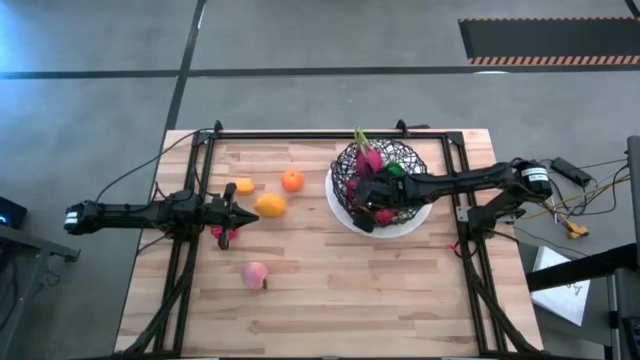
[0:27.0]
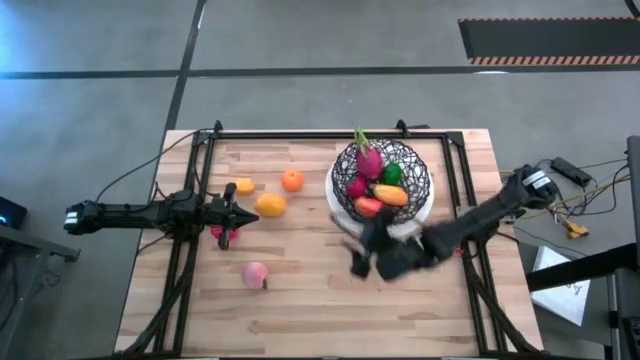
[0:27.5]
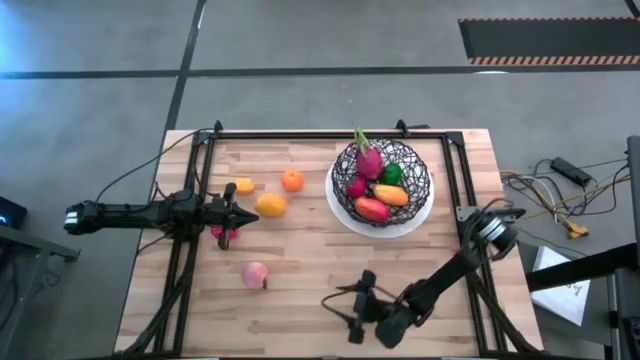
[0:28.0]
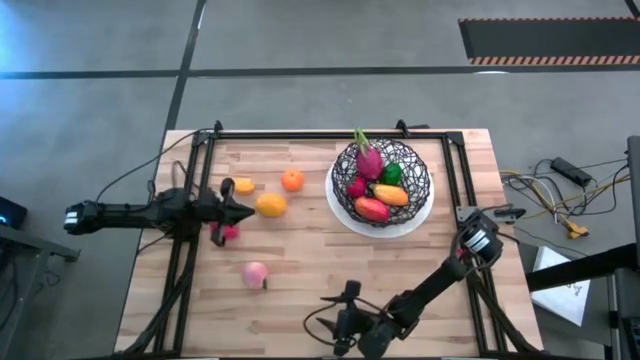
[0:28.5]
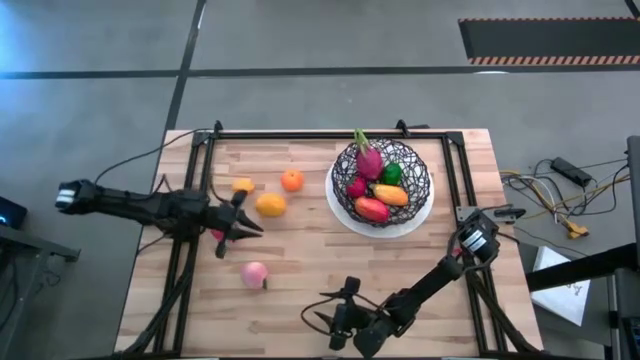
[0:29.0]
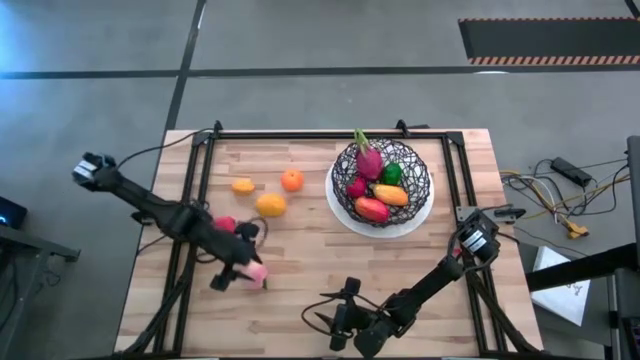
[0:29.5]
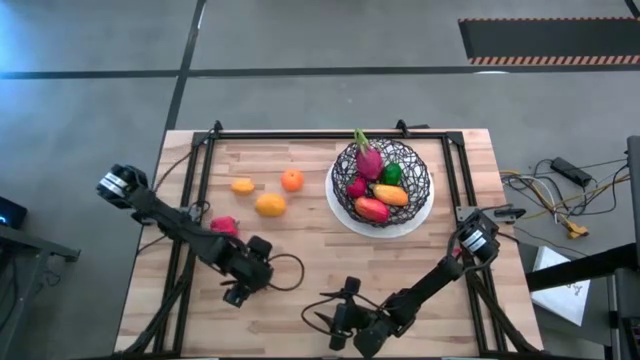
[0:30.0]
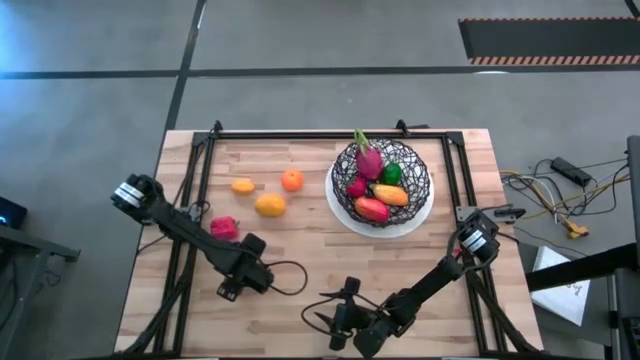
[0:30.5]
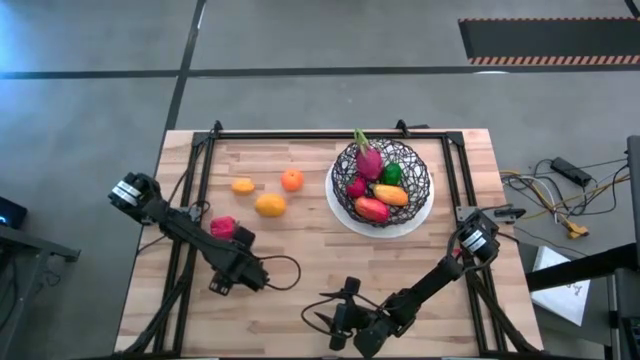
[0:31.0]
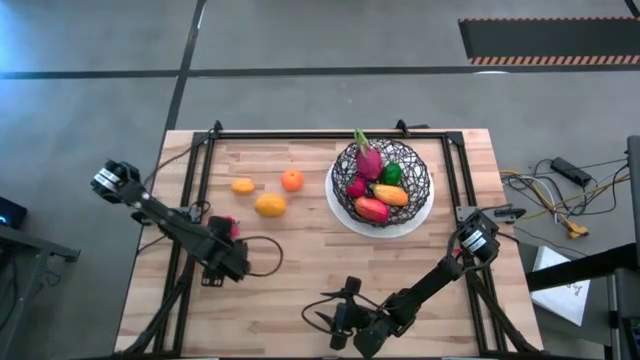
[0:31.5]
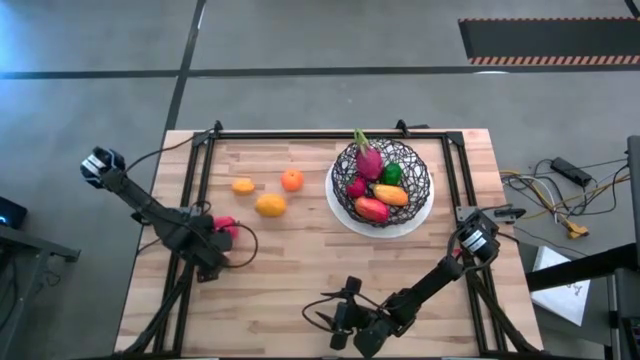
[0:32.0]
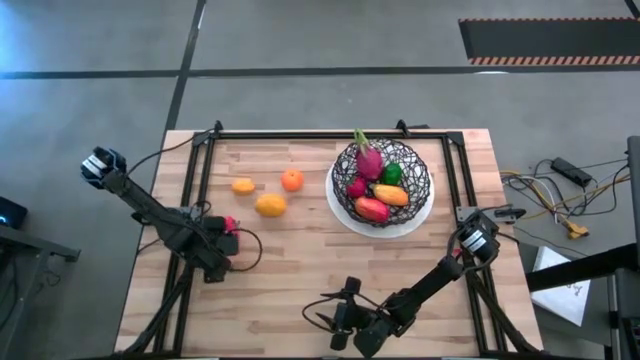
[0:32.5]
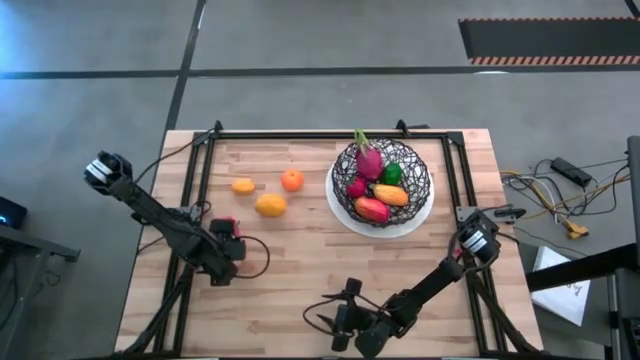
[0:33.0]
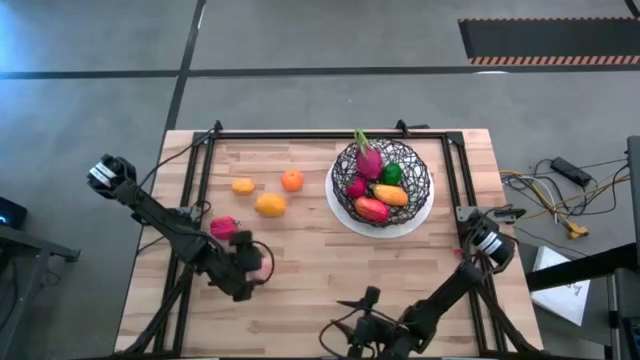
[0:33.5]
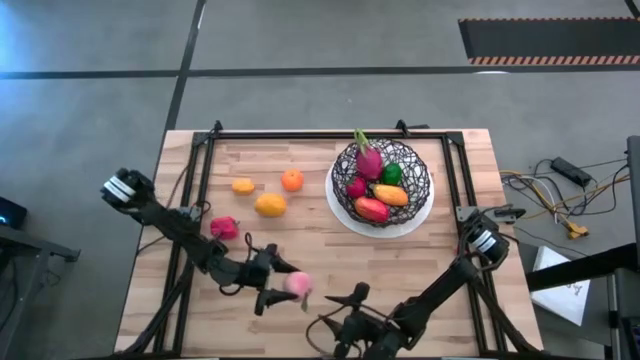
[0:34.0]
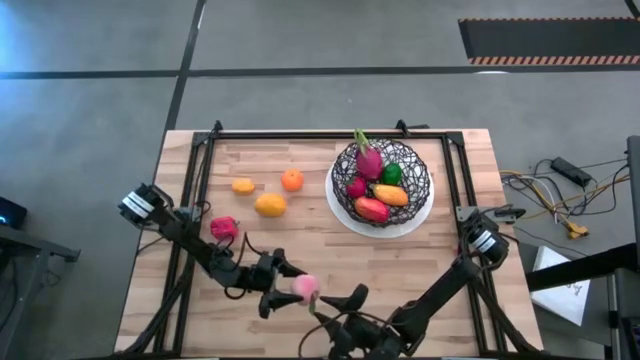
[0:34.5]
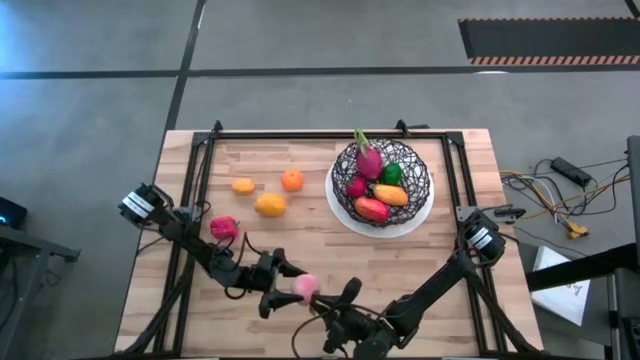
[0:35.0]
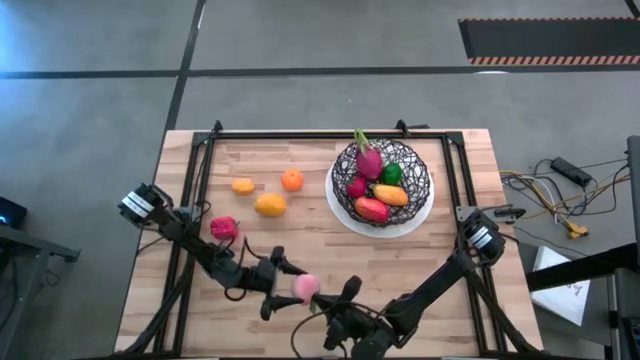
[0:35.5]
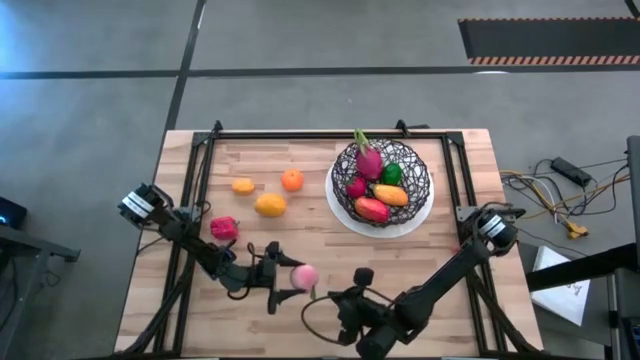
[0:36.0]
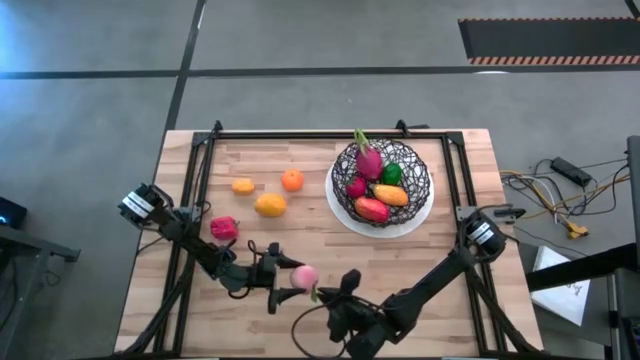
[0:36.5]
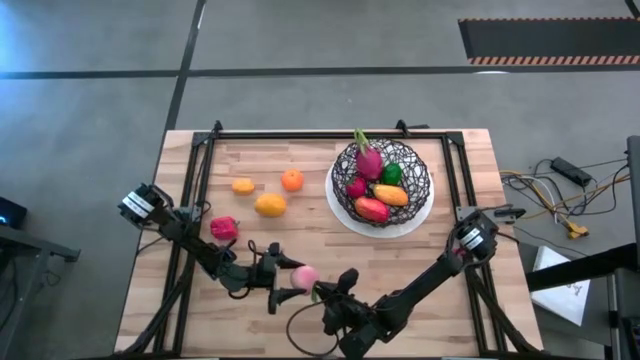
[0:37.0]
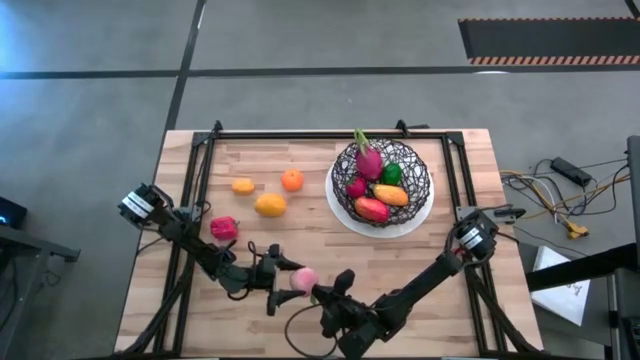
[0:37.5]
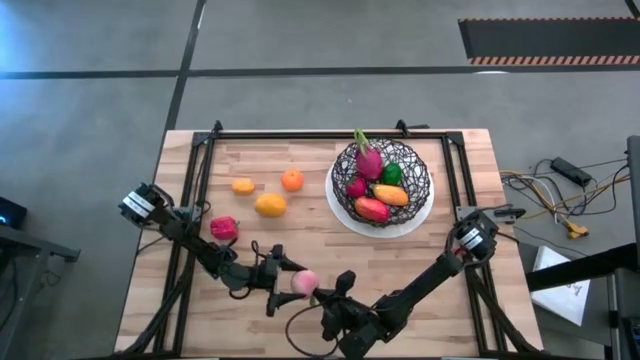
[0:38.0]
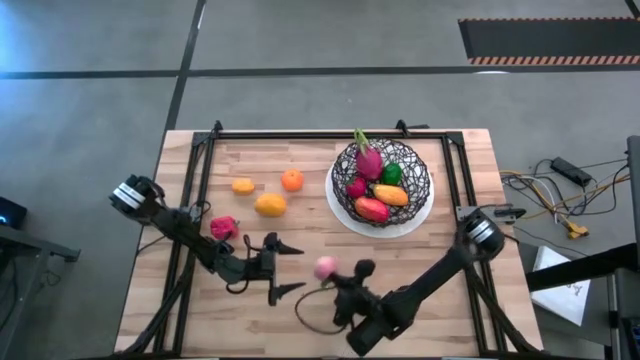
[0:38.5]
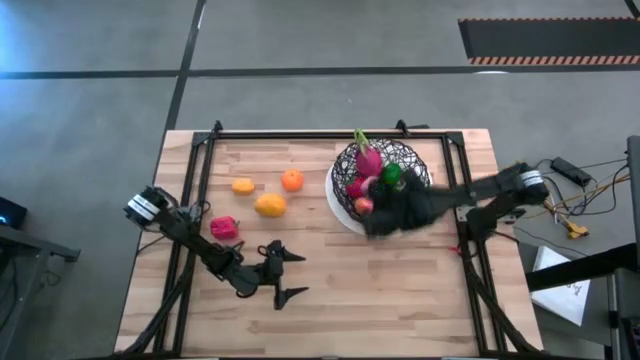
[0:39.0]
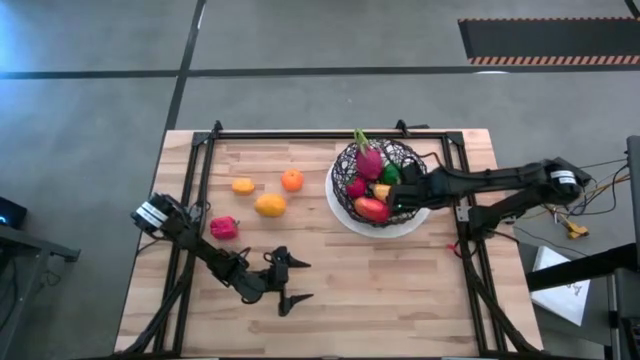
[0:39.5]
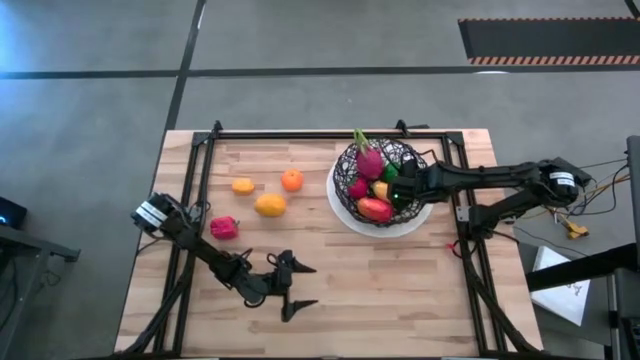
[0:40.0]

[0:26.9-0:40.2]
Task: Build produce basket
Put the peach into the black basket

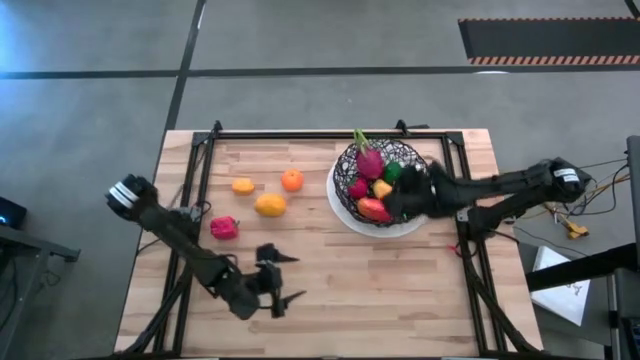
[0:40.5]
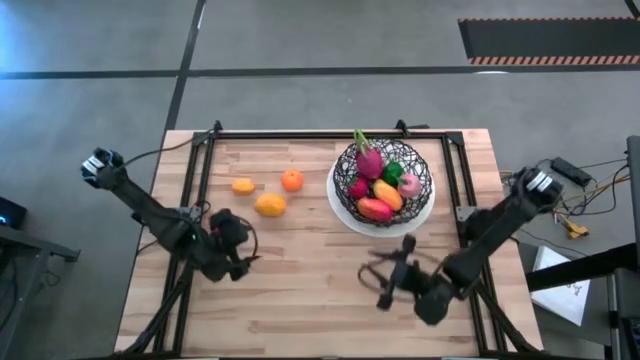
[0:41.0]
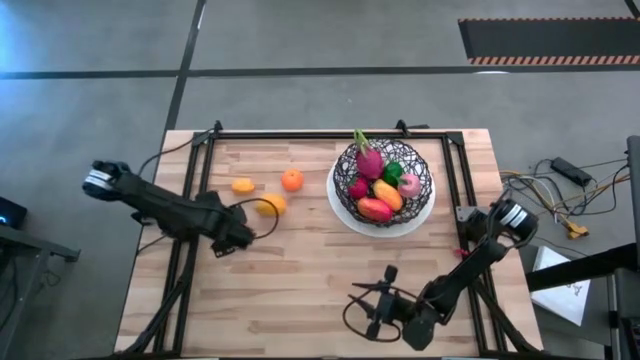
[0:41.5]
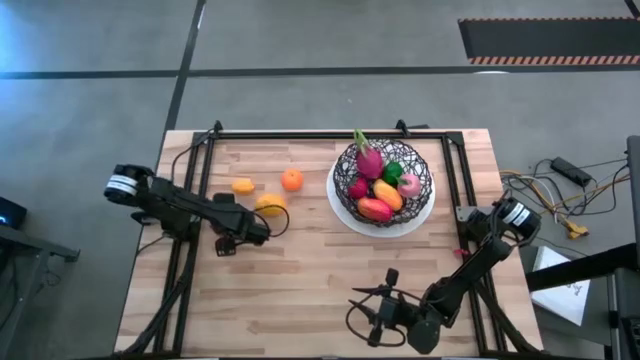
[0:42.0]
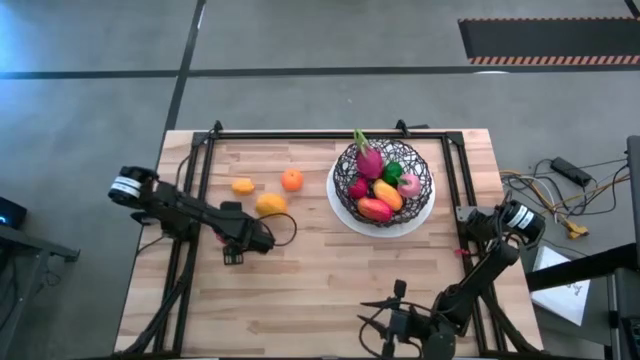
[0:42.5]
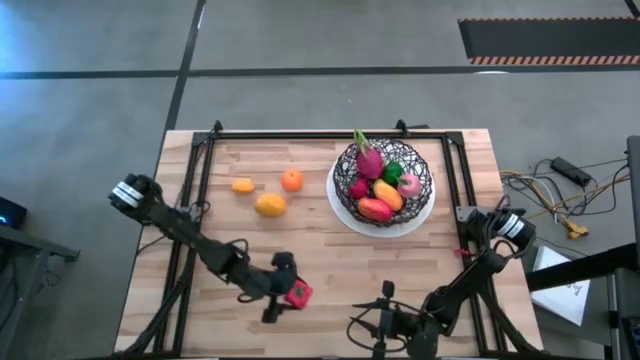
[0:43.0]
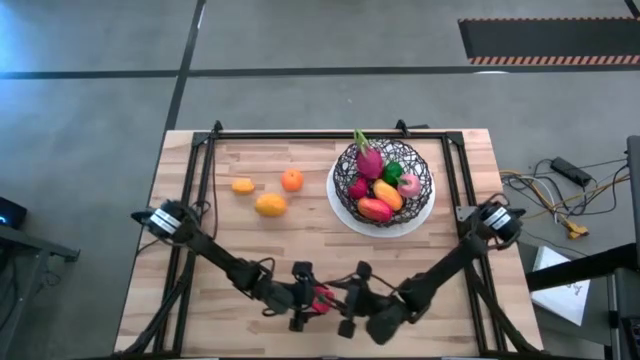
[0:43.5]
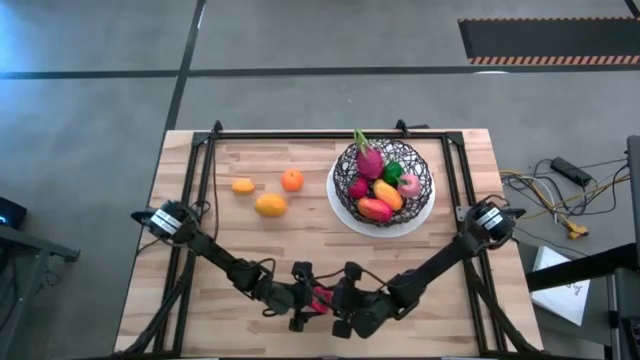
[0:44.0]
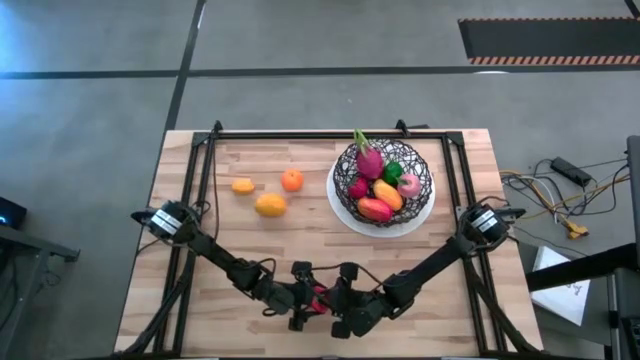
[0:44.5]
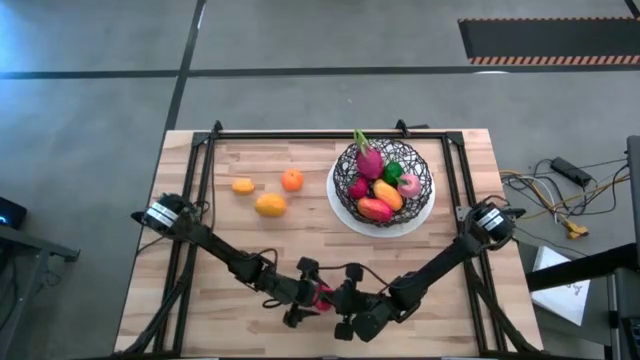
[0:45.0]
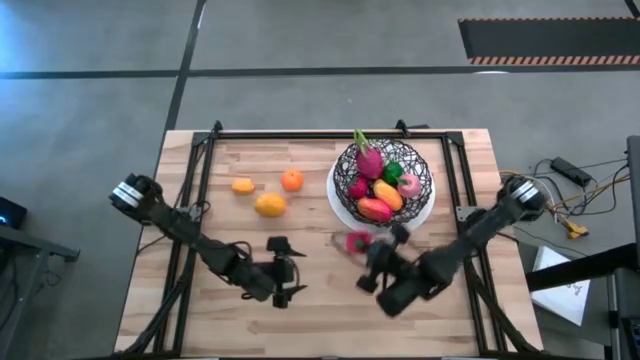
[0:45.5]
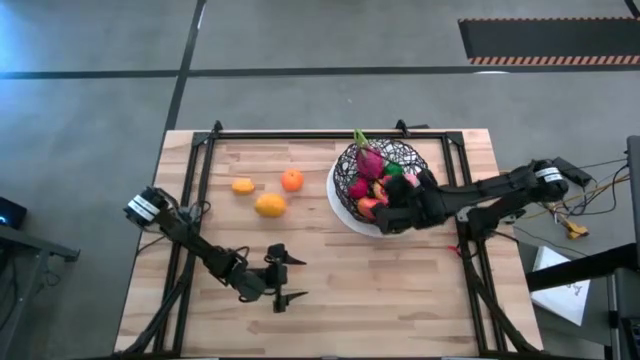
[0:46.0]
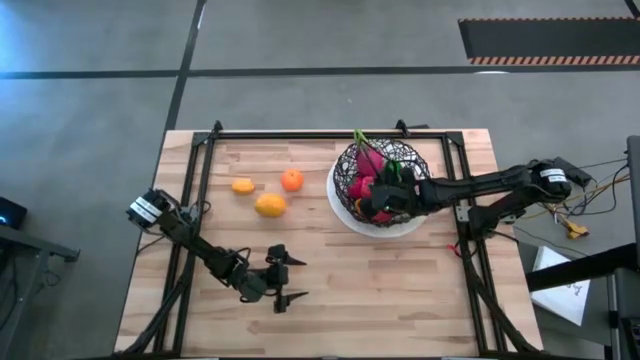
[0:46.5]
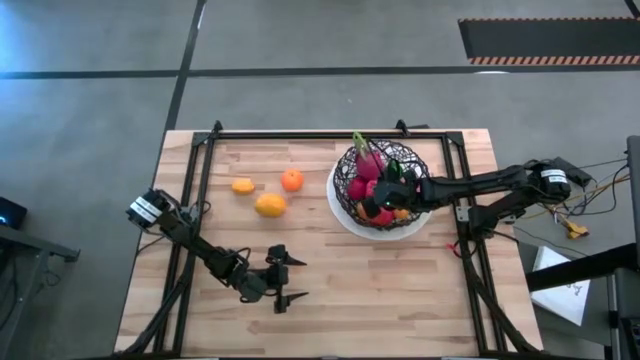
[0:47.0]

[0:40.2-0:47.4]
Put the bell pepper into the black basket
